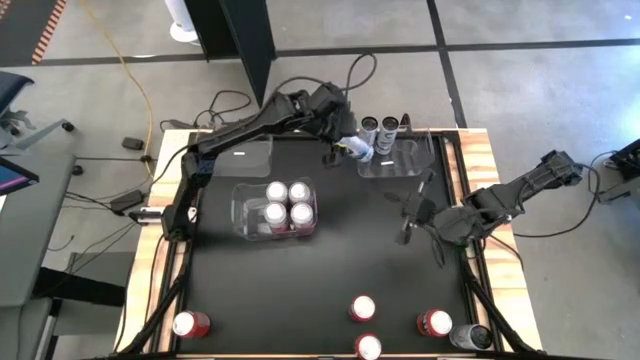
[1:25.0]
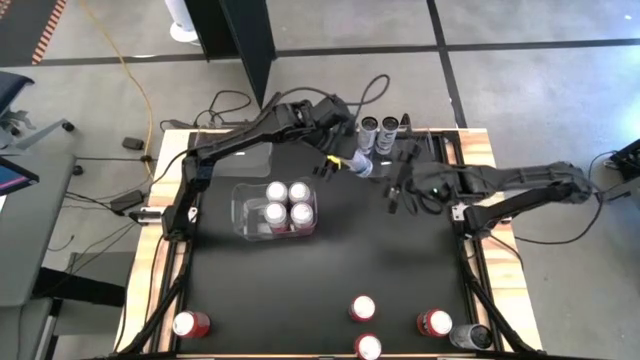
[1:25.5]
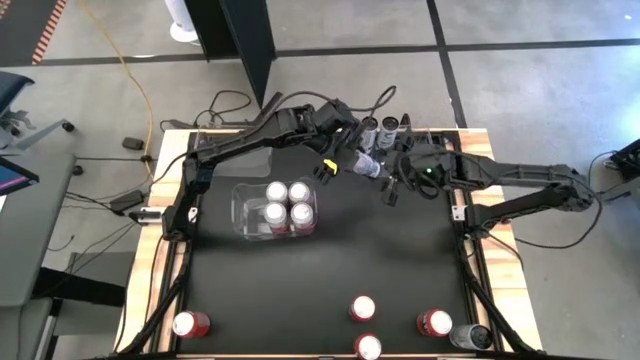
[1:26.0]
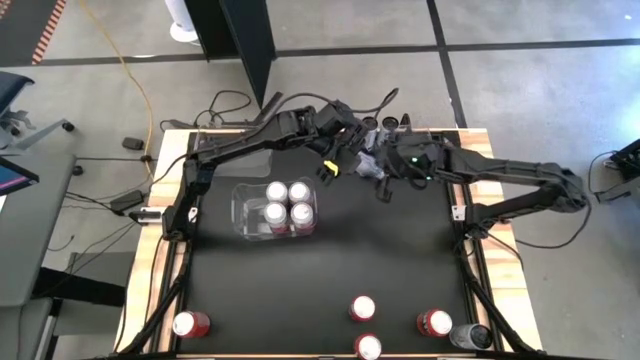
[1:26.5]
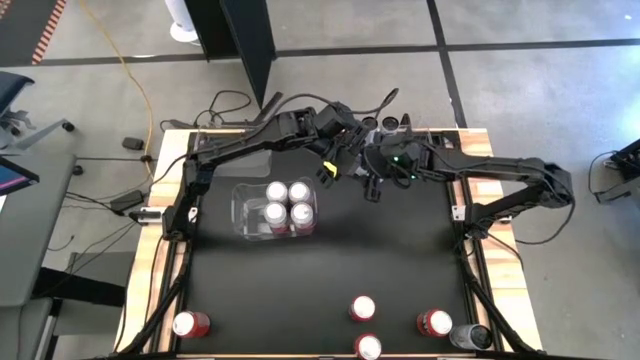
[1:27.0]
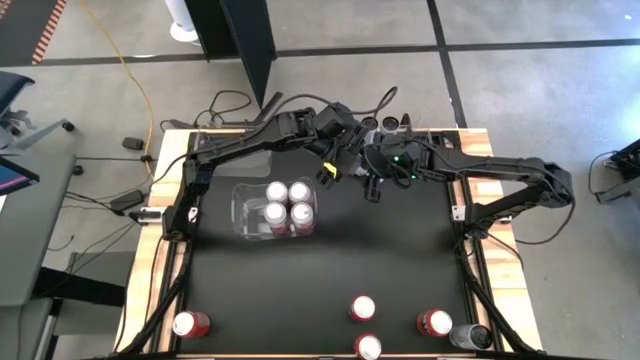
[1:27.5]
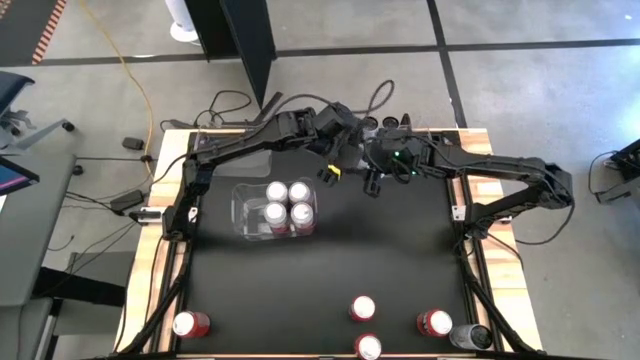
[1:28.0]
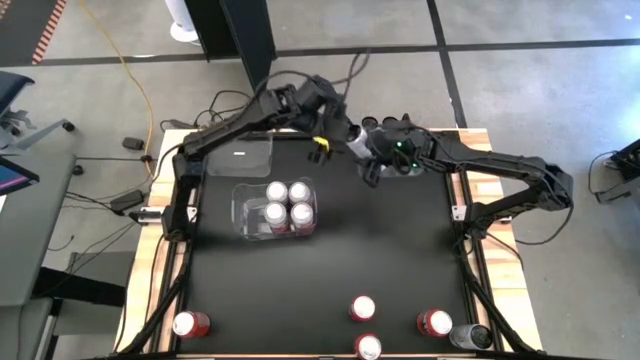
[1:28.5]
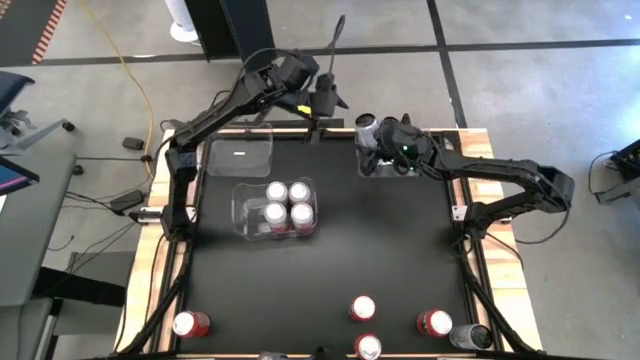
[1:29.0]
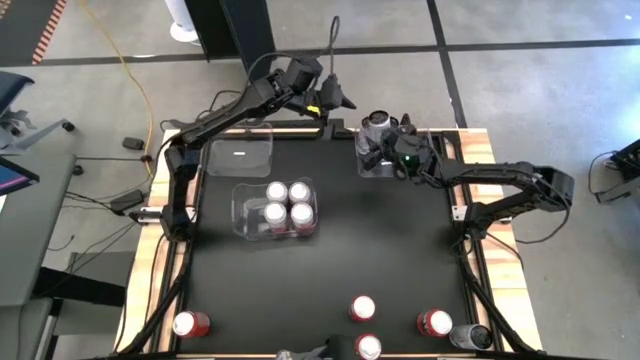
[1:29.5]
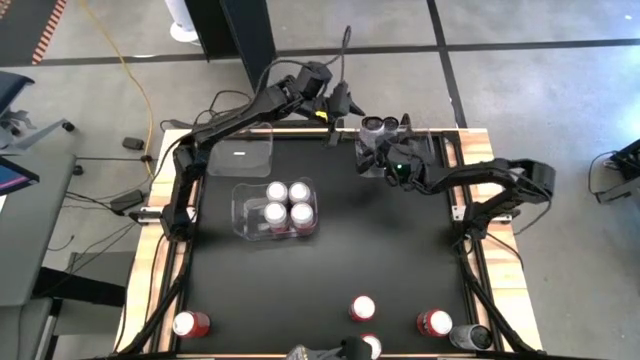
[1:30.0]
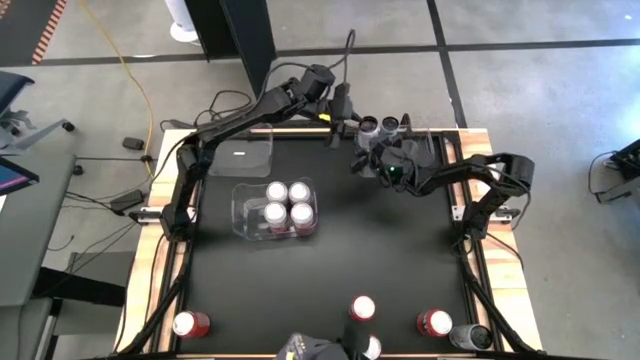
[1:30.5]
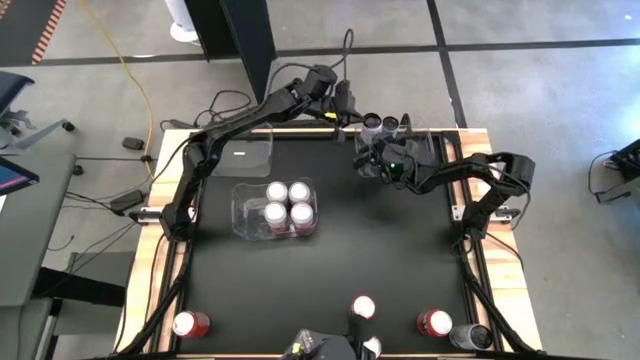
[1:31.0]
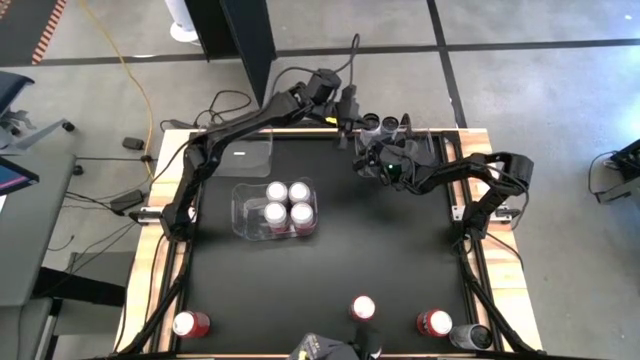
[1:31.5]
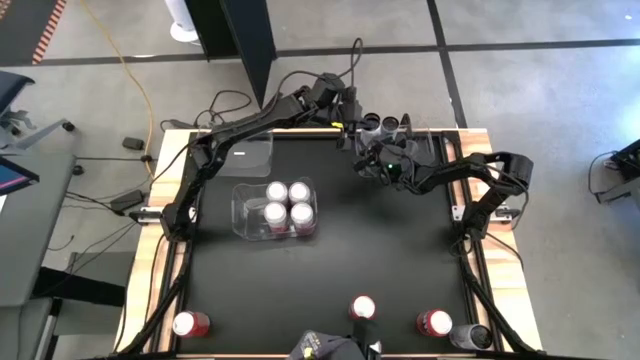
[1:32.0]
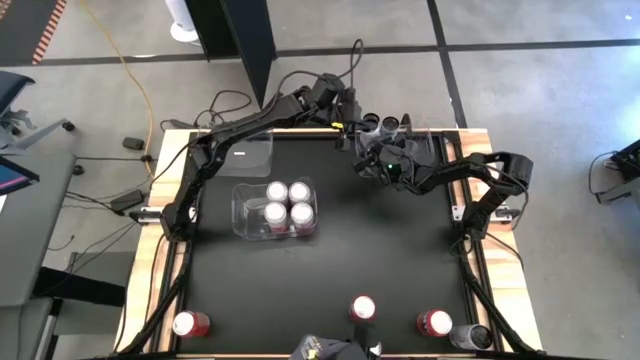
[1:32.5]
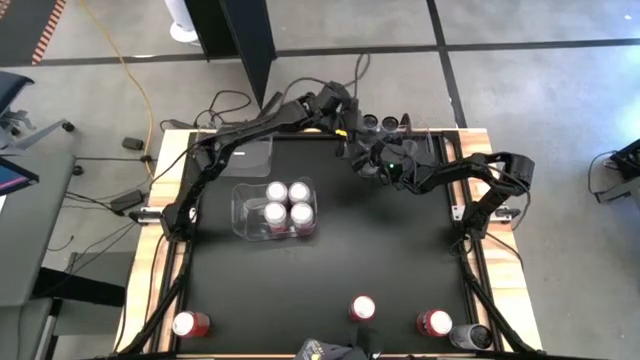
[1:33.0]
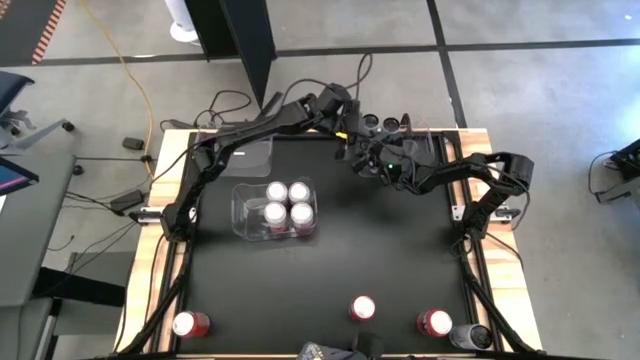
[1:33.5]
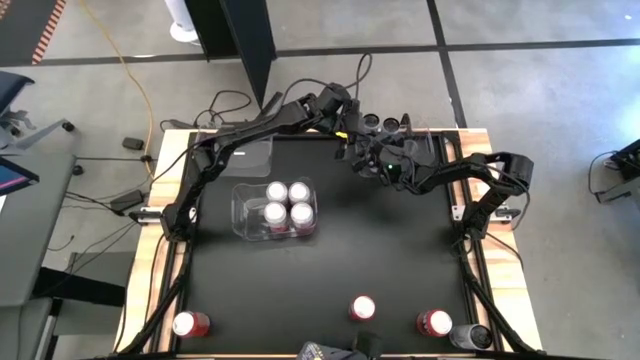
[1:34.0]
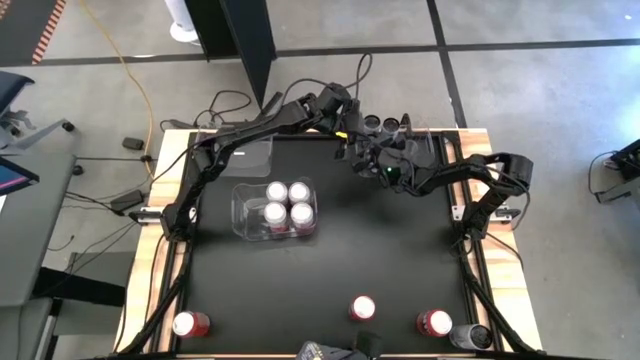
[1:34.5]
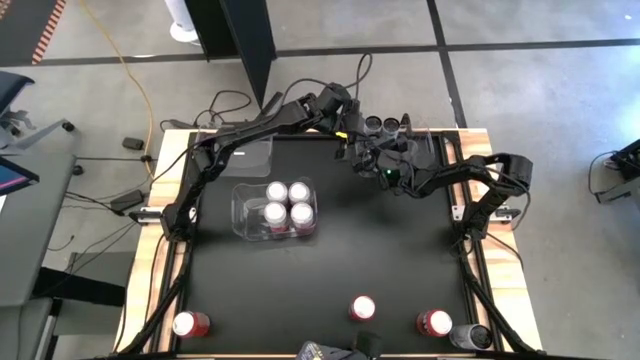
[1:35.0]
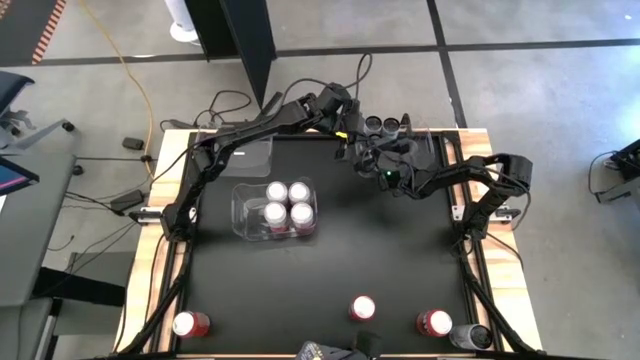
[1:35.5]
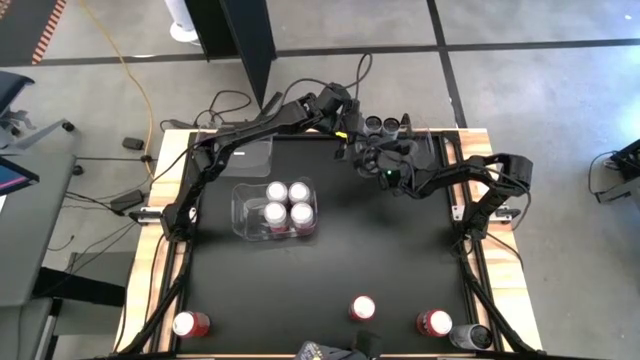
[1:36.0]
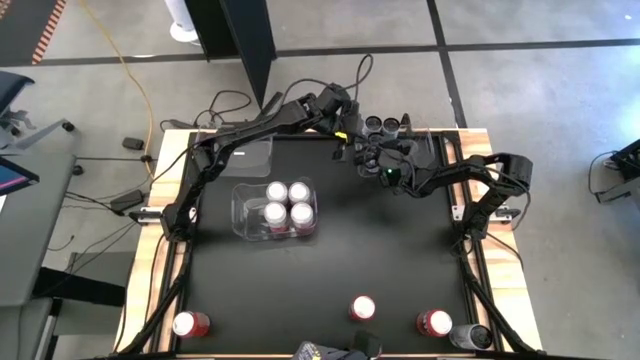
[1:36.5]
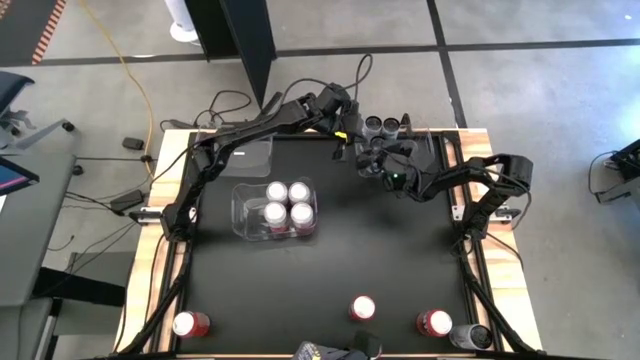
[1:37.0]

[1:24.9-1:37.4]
Task: Sort soda cans
Put the right white and blue soda can into the right transparent bin

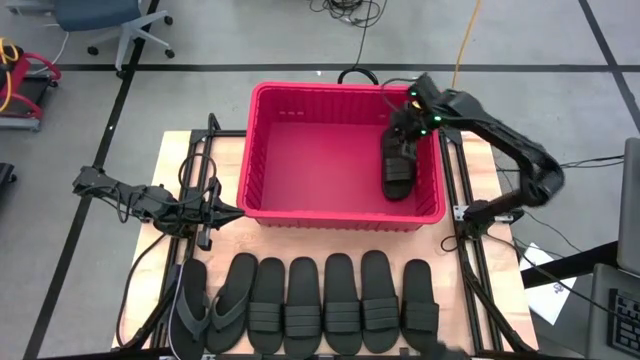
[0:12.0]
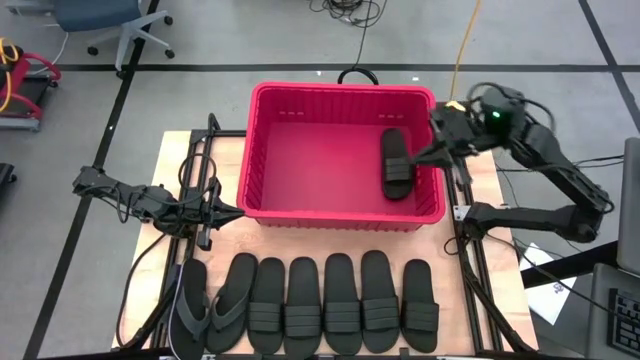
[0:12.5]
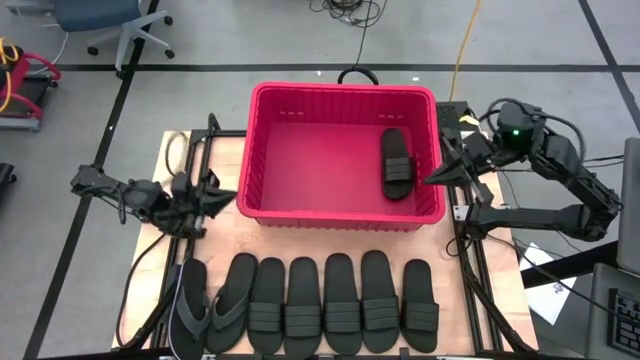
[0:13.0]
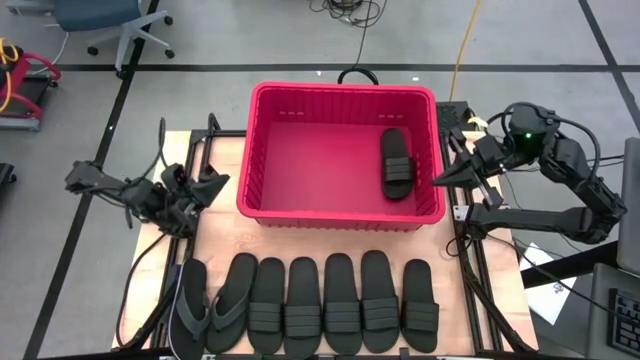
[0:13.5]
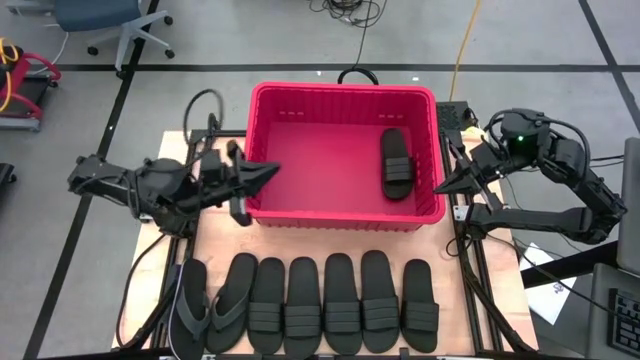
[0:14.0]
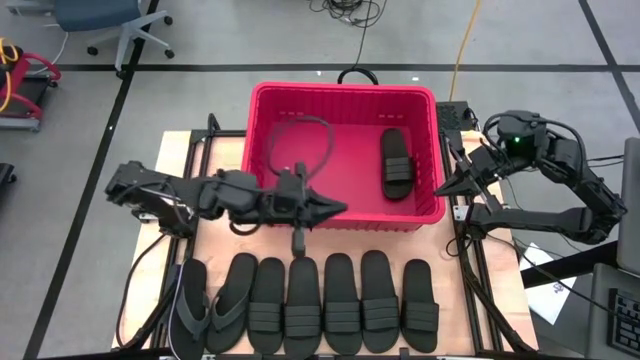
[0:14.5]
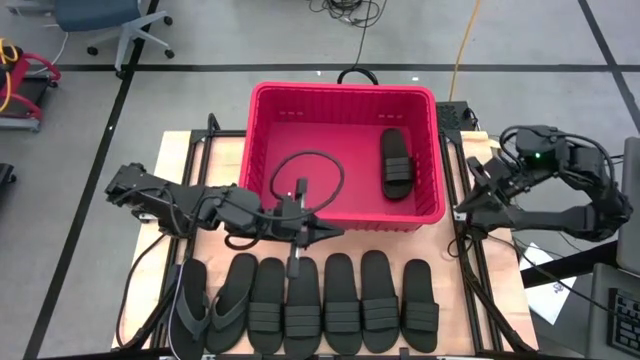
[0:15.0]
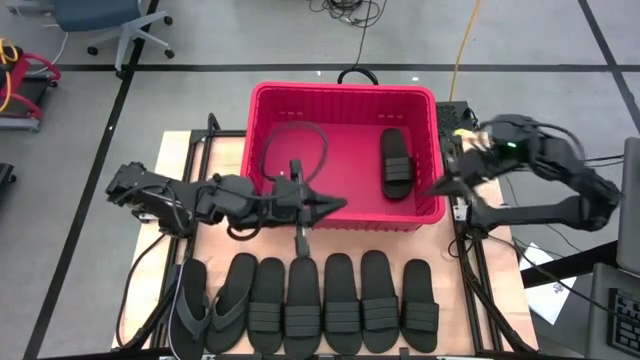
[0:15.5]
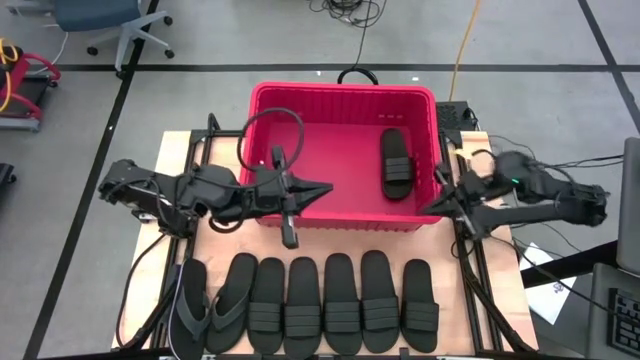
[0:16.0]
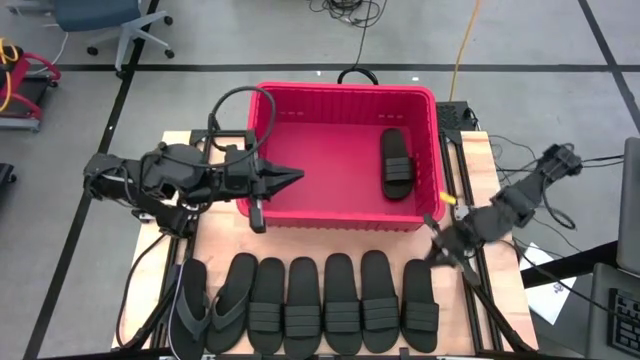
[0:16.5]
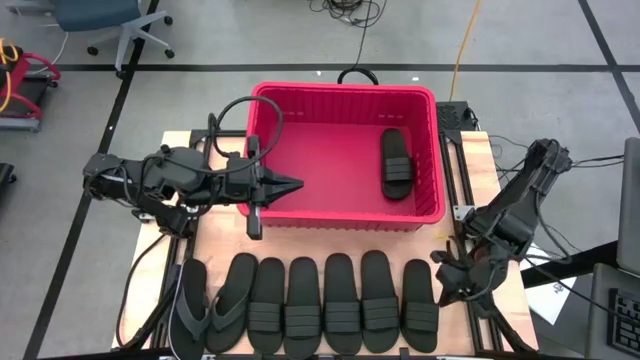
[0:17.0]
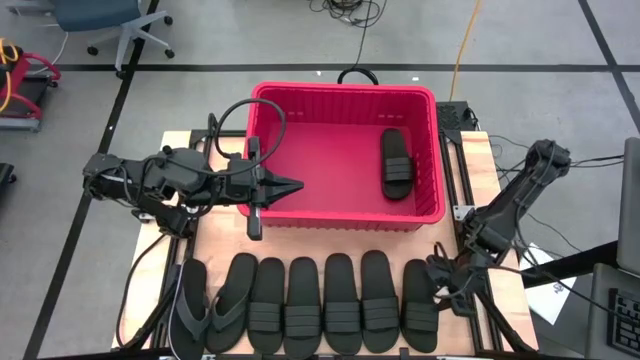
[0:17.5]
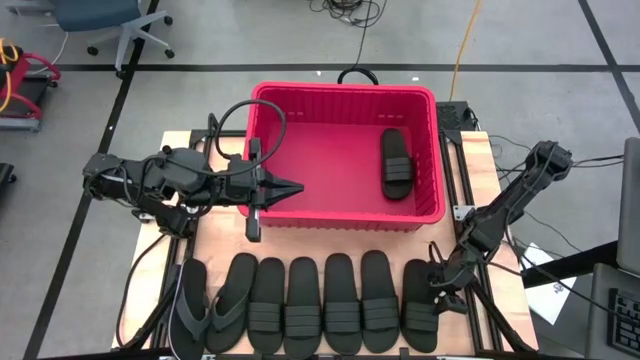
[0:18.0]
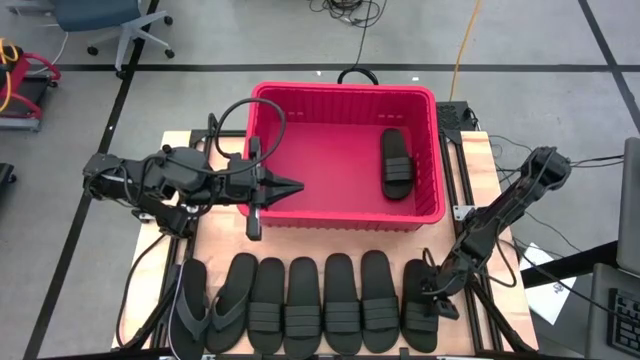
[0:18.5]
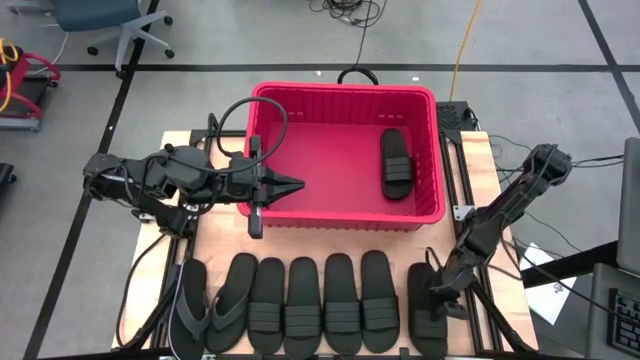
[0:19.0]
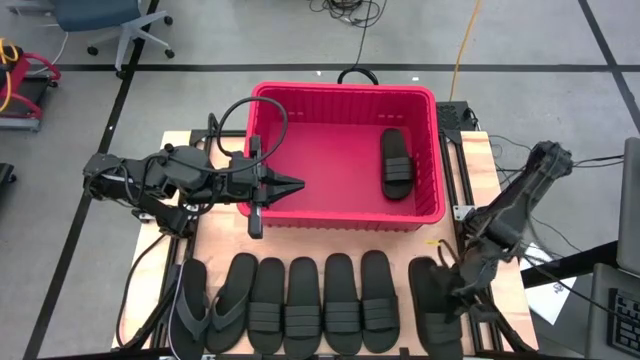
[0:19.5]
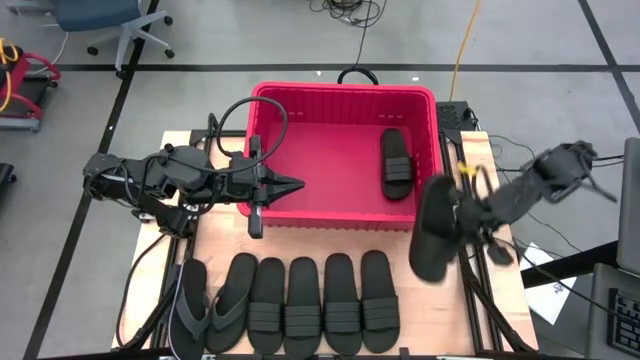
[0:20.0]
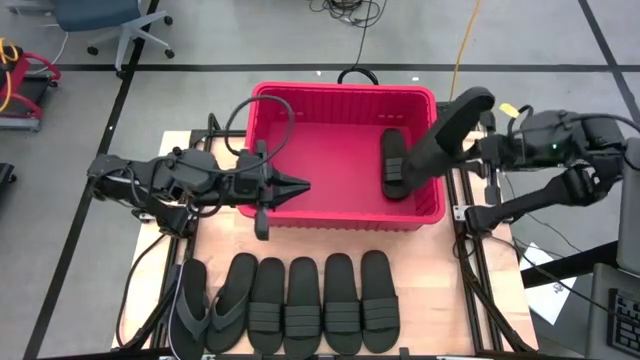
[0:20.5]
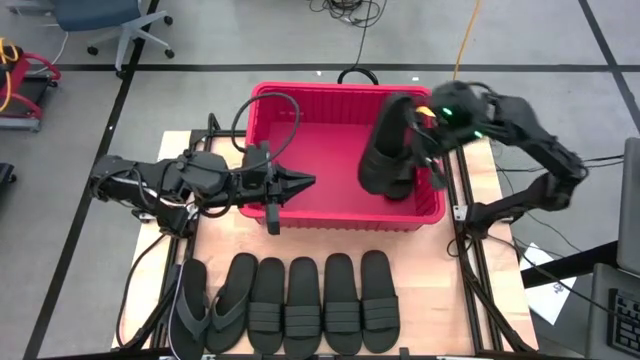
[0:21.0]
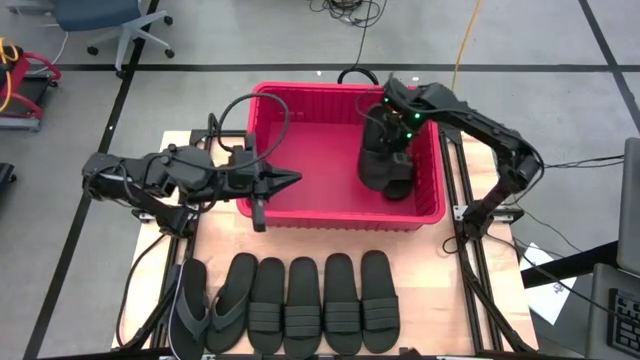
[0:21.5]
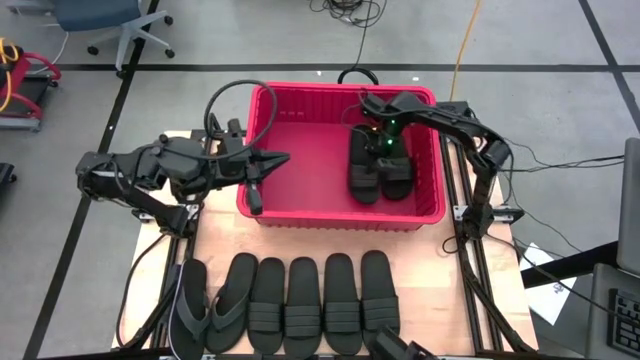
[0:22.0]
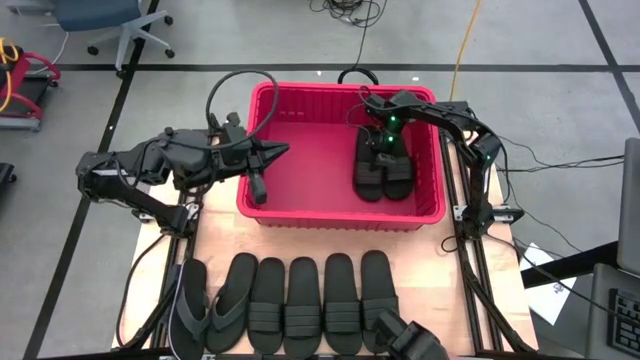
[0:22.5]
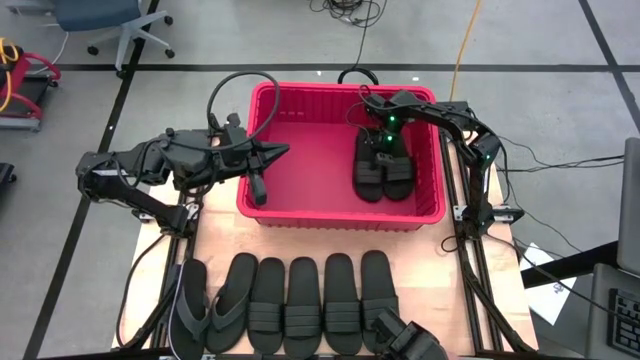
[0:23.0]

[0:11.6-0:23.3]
Task: Pick and place slides into bin
Put the black slide into the red bin
